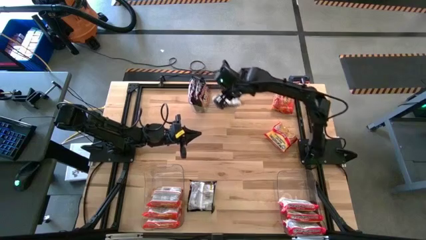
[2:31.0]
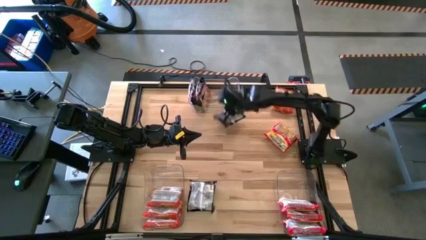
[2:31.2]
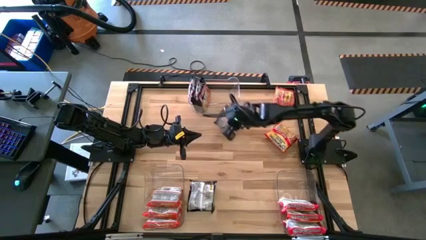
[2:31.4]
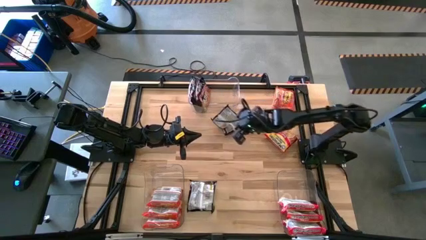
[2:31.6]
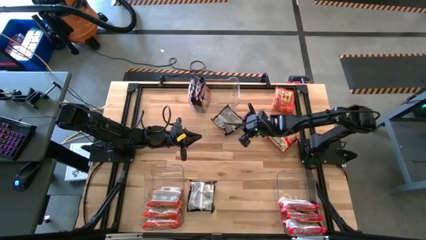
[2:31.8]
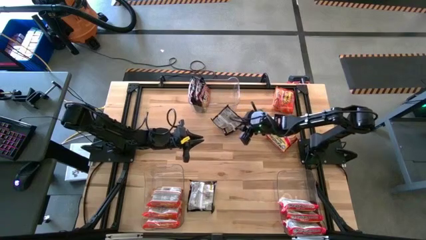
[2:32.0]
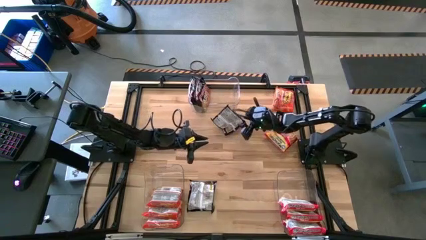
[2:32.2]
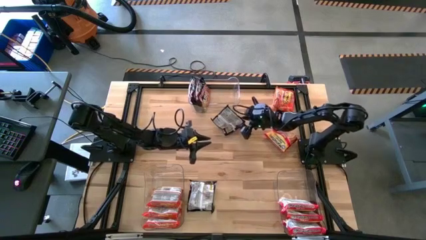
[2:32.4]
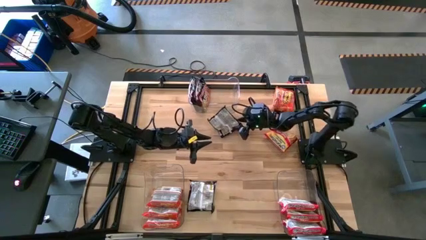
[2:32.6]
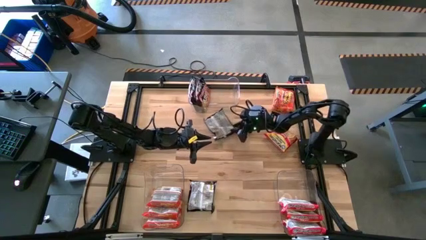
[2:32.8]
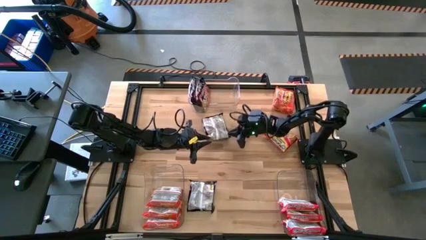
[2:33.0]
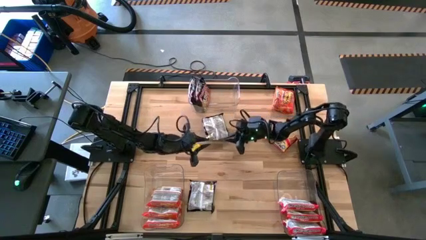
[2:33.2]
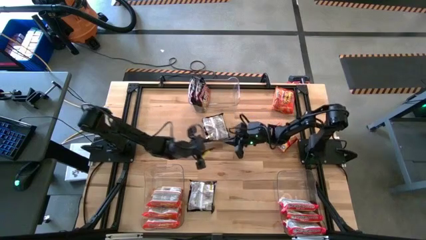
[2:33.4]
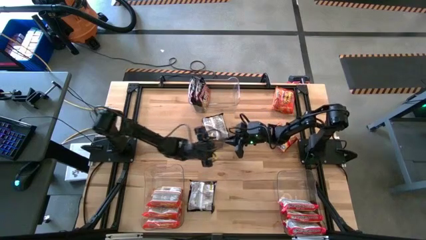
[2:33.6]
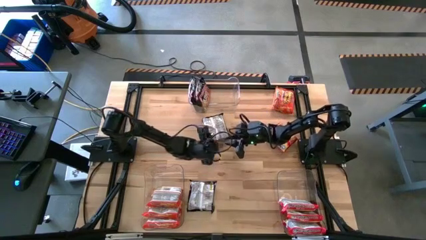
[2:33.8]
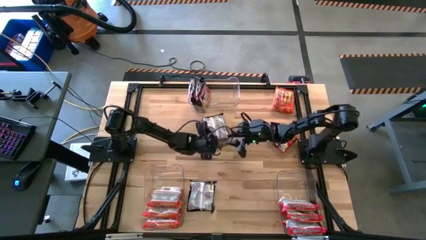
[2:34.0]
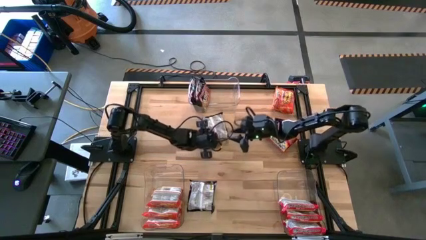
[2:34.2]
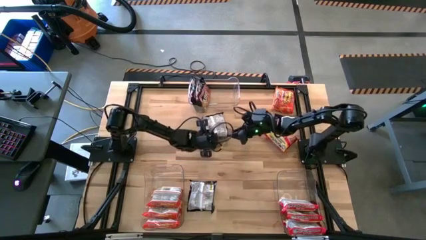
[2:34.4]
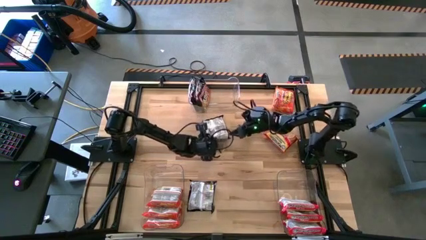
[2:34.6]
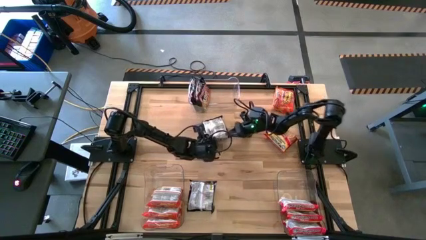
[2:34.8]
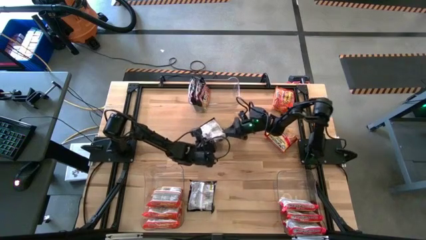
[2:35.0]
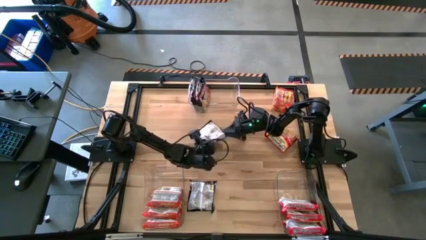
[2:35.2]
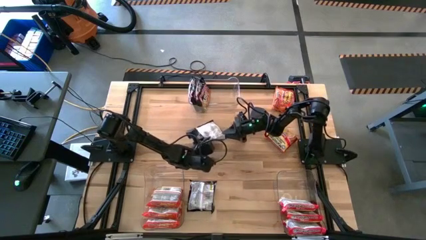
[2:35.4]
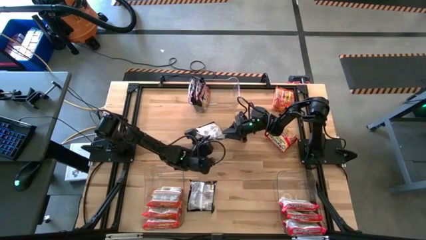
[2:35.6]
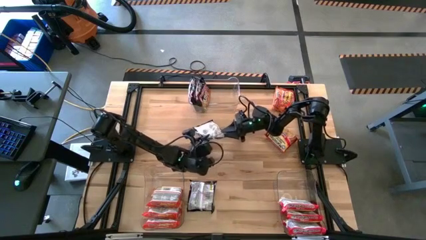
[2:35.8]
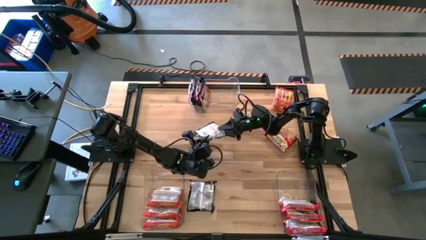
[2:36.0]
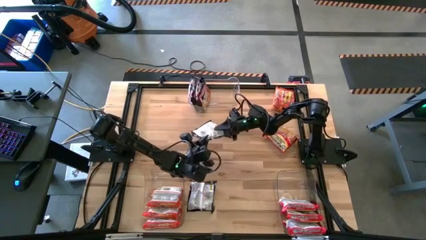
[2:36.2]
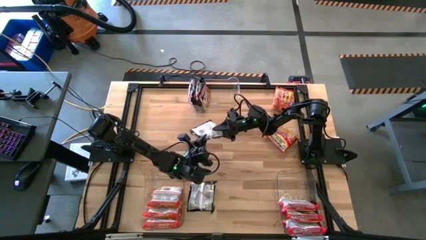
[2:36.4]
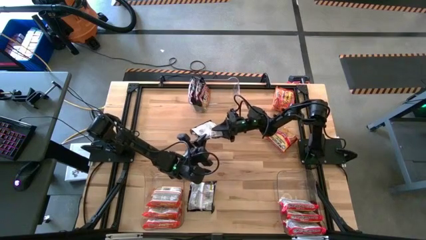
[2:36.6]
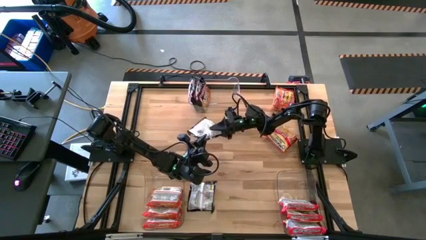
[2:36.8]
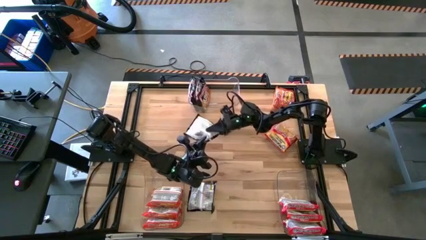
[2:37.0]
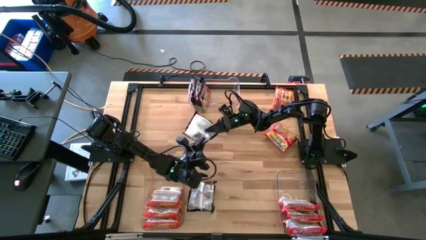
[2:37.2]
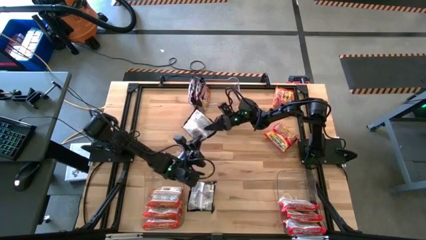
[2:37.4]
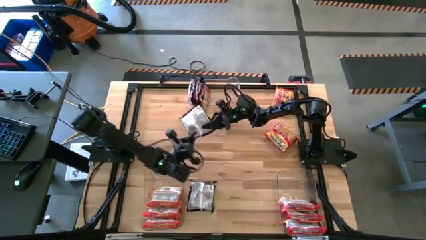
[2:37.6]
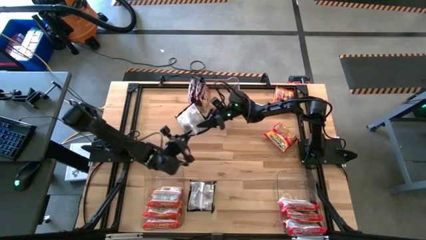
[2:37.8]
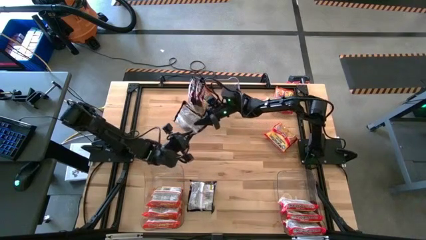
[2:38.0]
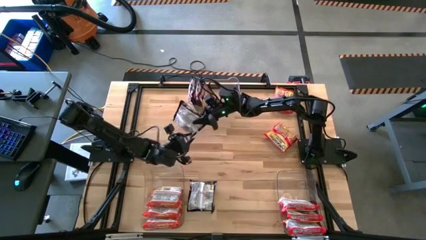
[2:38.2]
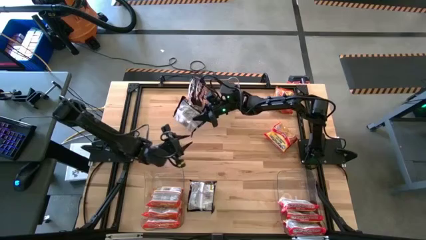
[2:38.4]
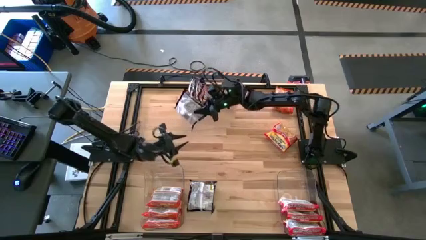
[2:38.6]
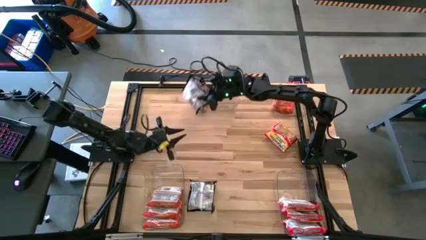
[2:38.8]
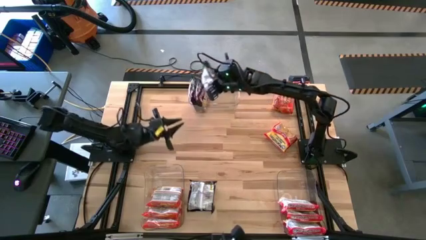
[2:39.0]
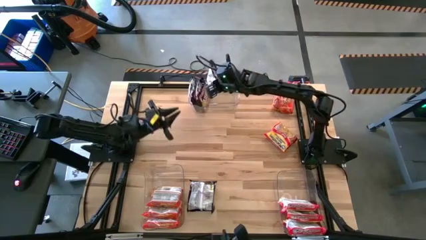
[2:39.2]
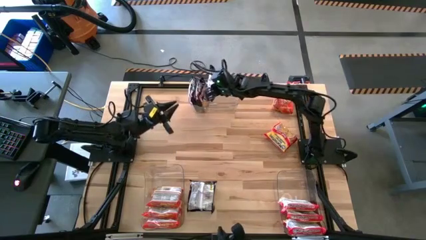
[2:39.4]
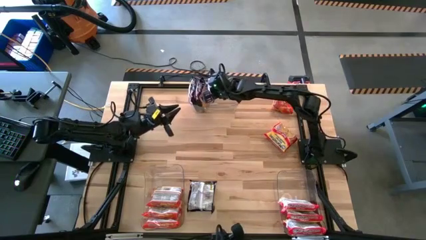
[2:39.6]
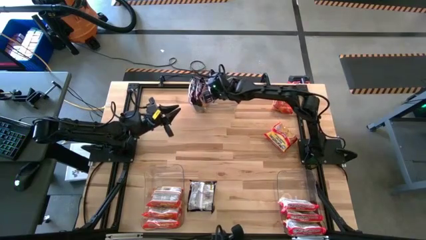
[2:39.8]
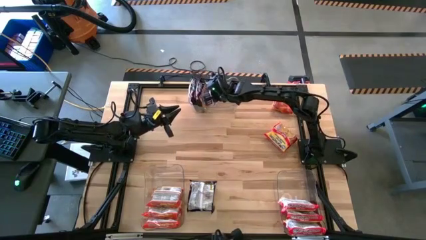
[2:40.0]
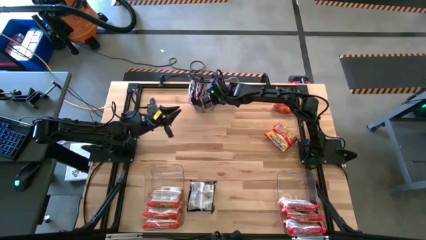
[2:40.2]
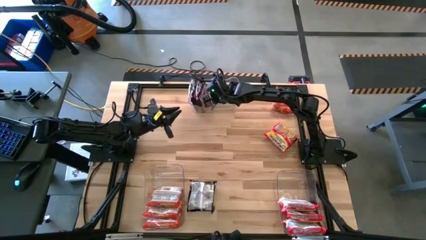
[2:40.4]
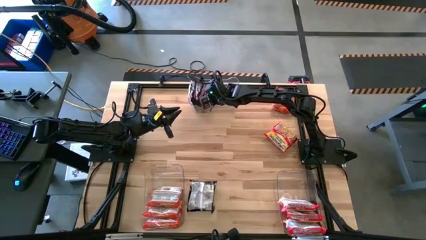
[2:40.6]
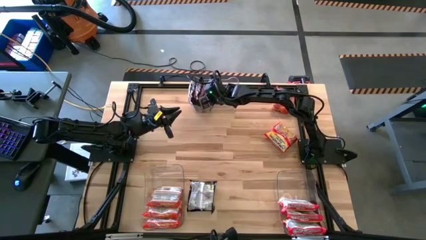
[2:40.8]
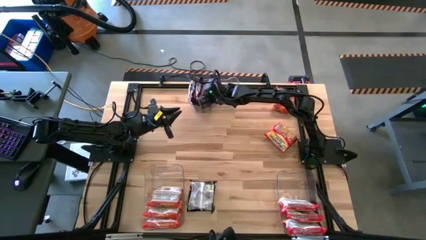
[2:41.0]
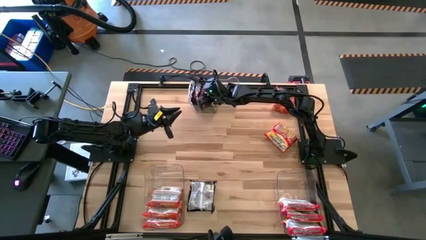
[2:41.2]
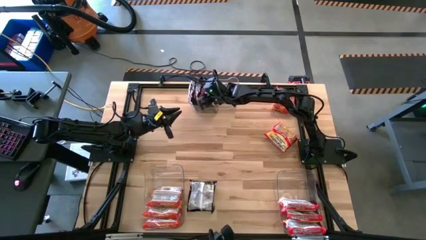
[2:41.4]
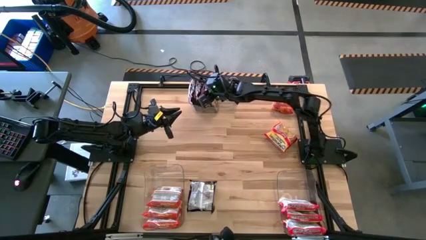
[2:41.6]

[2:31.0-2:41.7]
Task: Sort Maruchan noodles
Put the top black noodle pack into the top transparent bin

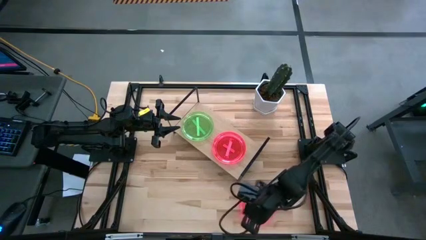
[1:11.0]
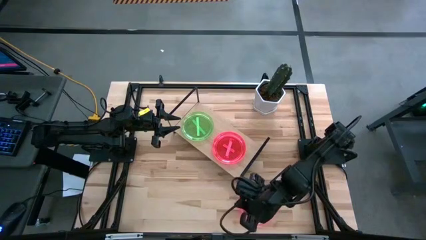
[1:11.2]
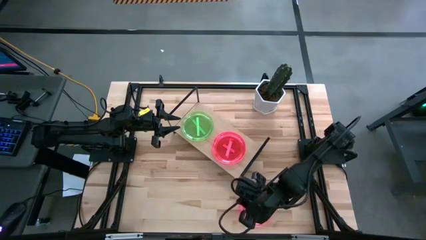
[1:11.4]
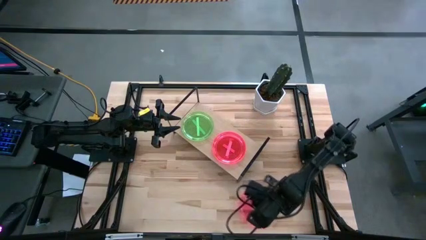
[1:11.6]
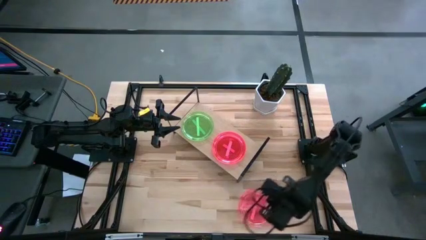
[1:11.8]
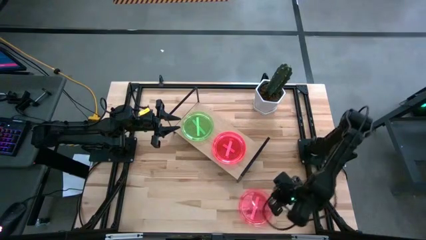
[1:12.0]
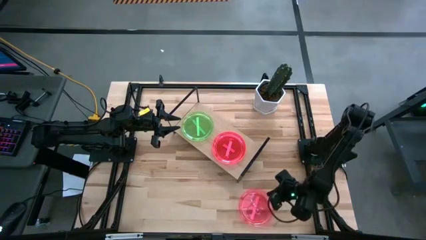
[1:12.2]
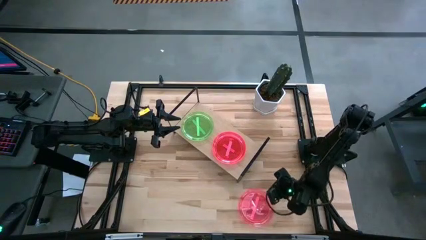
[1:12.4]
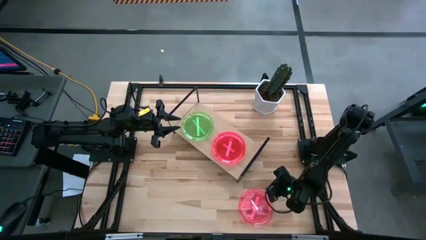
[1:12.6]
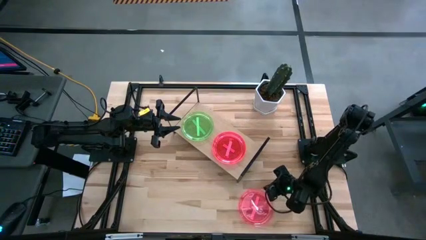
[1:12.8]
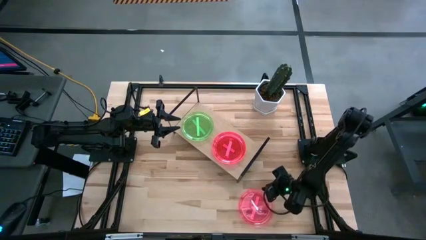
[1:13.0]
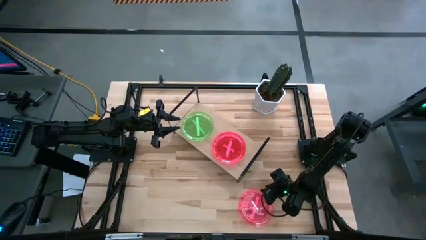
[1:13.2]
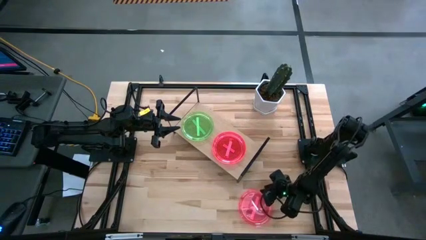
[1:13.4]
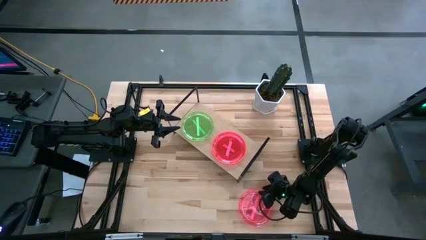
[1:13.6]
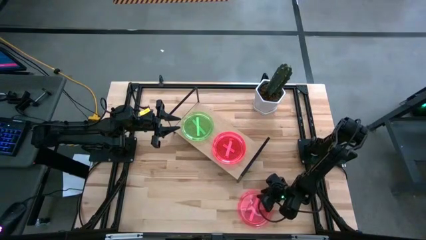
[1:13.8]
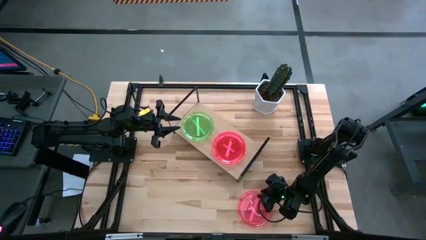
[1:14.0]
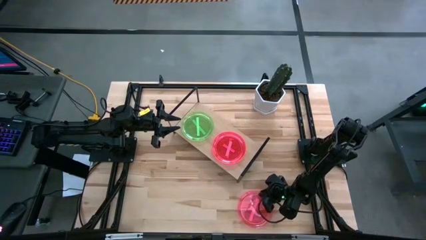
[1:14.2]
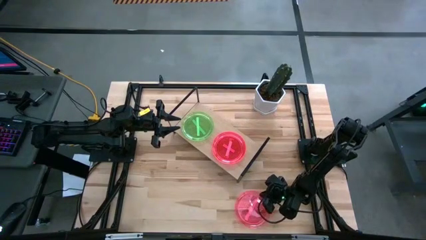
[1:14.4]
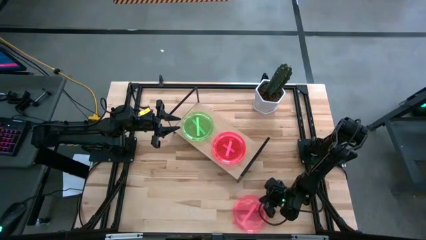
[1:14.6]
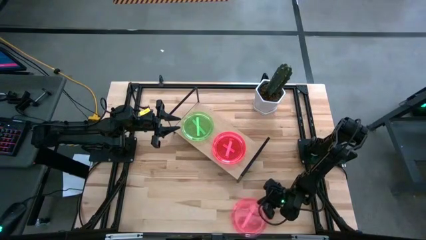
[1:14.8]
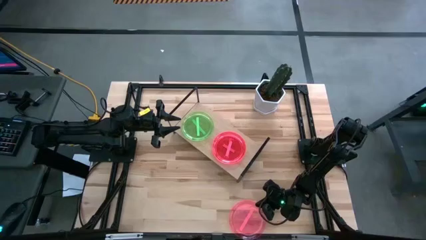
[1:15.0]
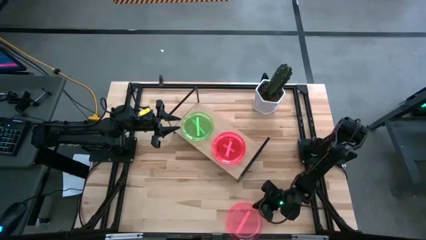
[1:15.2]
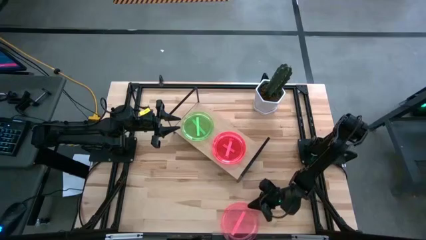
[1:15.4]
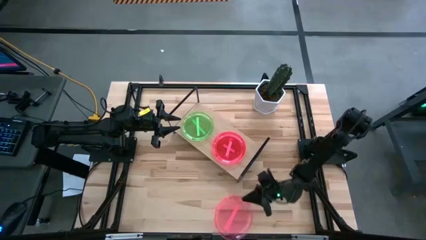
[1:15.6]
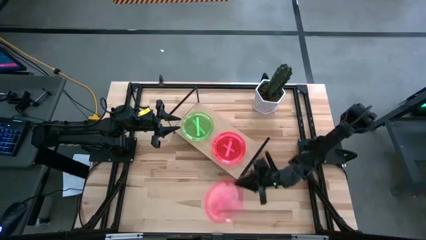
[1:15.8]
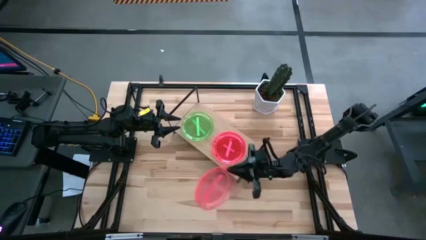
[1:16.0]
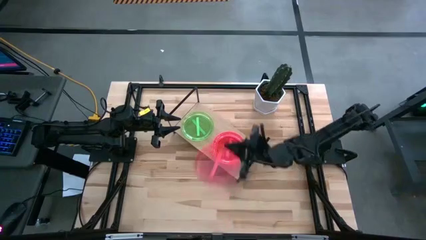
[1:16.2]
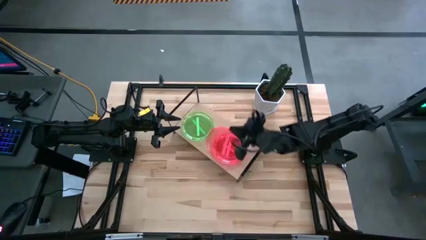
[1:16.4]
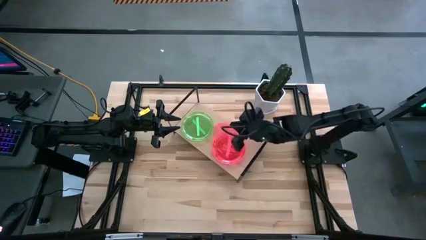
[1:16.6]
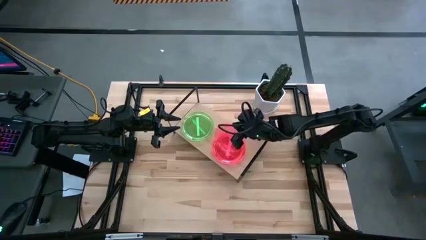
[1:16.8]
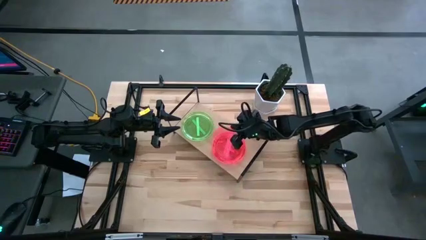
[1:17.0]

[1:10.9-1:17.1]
Task: Place and stack plates onto a shelf
Stack the pink plate on top of the other pink plate on the shelf
